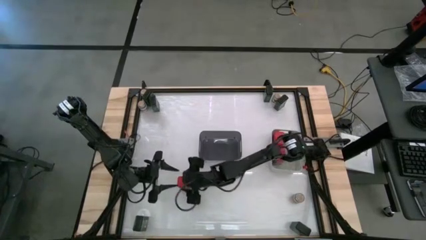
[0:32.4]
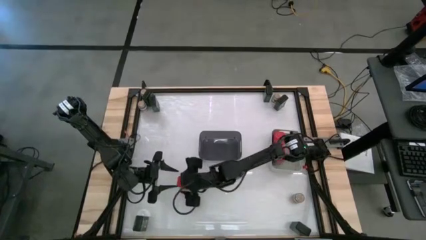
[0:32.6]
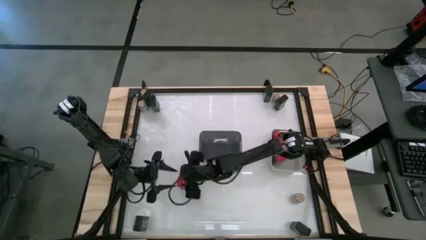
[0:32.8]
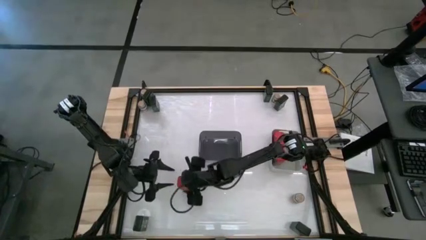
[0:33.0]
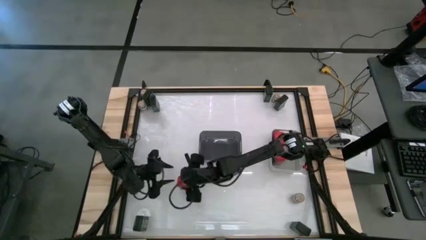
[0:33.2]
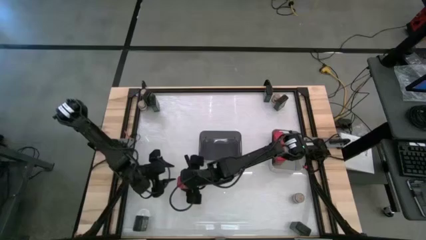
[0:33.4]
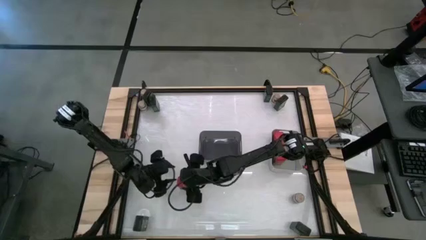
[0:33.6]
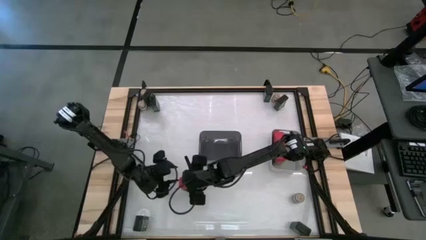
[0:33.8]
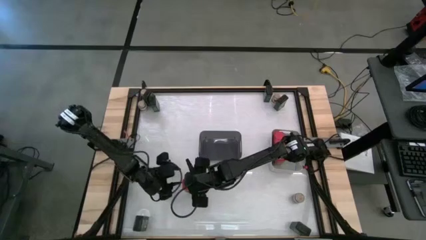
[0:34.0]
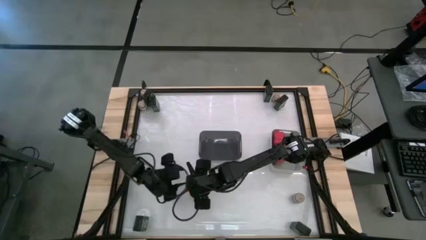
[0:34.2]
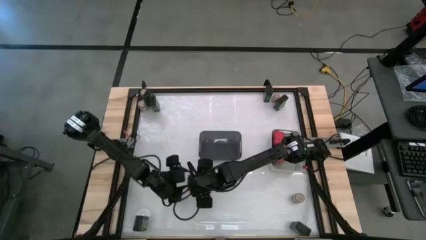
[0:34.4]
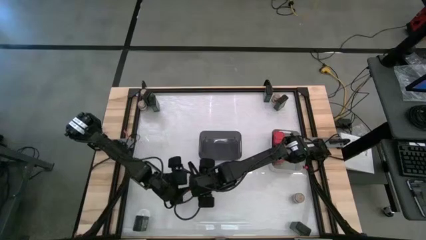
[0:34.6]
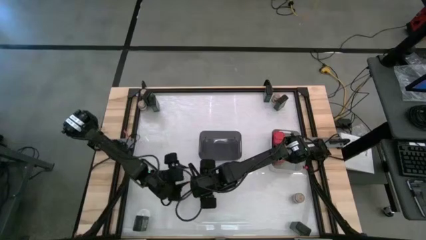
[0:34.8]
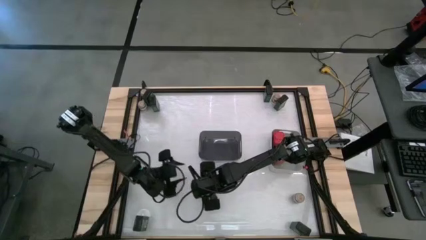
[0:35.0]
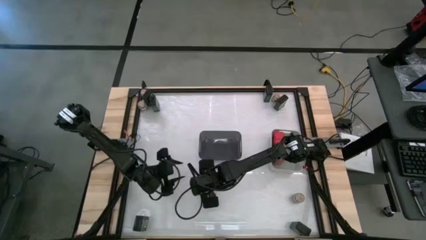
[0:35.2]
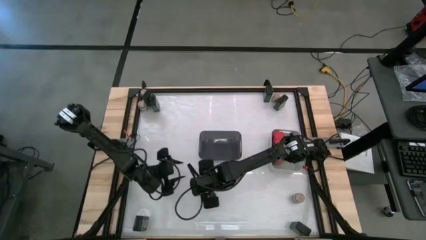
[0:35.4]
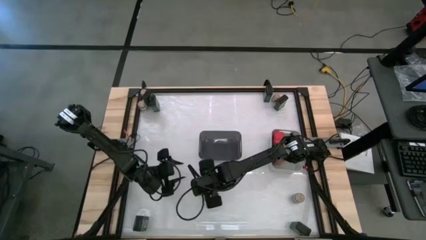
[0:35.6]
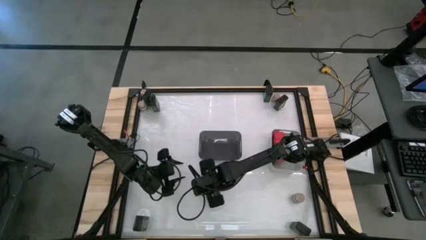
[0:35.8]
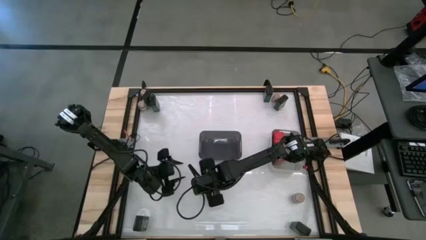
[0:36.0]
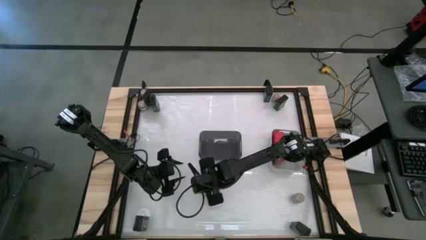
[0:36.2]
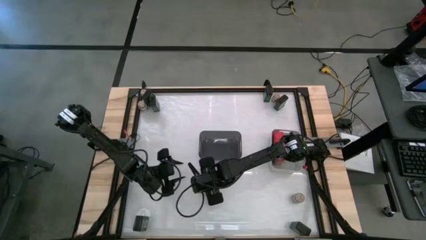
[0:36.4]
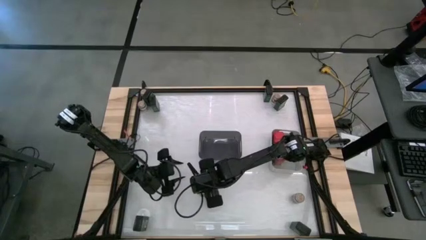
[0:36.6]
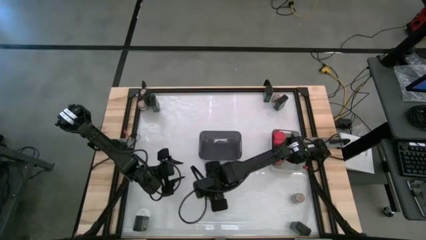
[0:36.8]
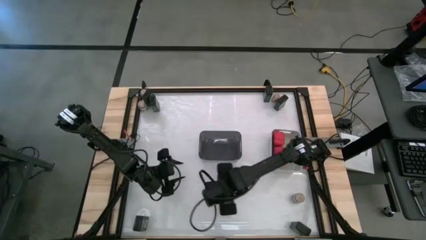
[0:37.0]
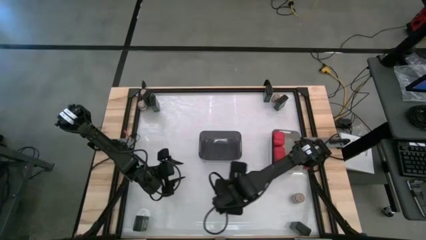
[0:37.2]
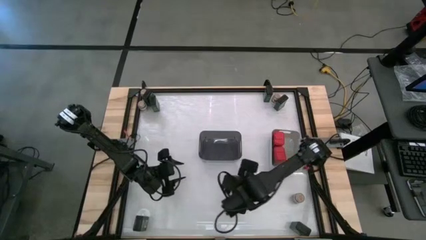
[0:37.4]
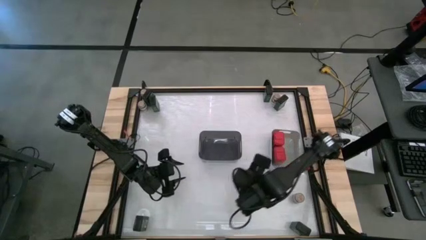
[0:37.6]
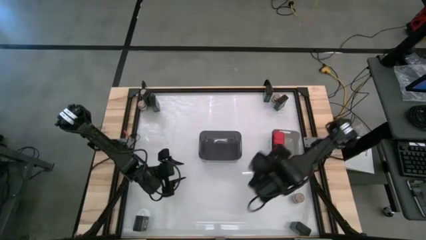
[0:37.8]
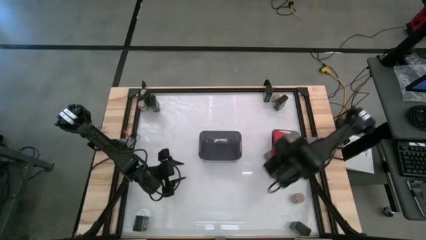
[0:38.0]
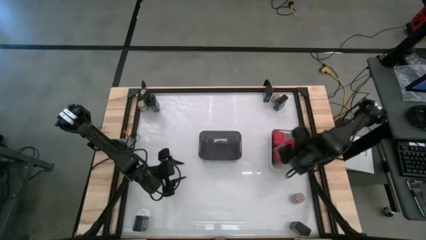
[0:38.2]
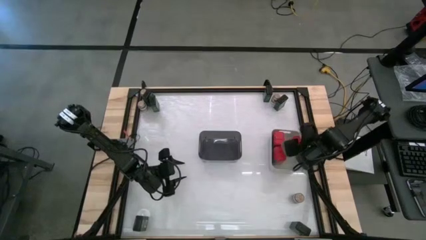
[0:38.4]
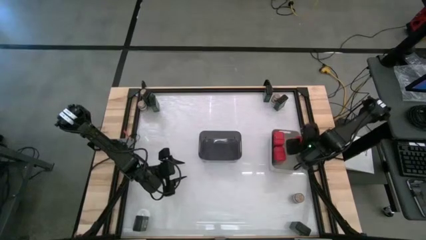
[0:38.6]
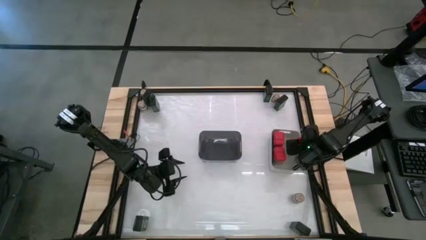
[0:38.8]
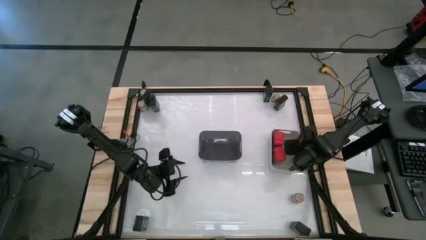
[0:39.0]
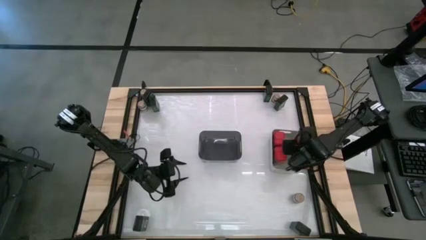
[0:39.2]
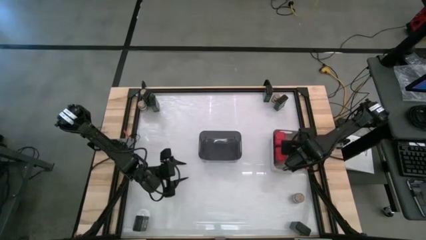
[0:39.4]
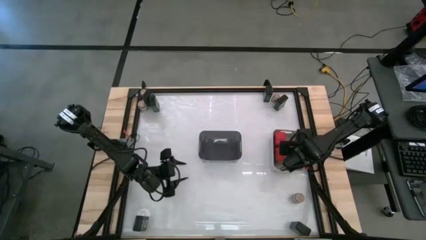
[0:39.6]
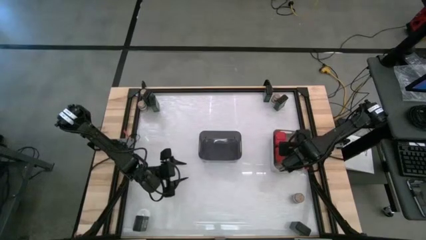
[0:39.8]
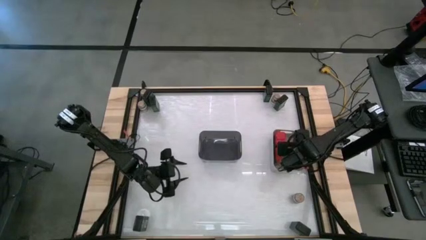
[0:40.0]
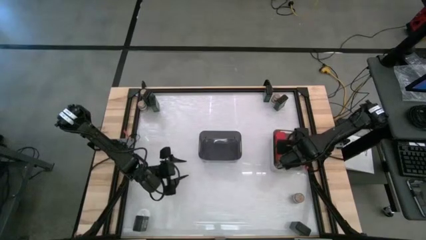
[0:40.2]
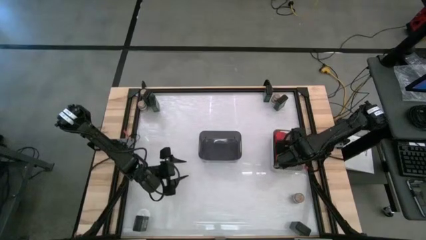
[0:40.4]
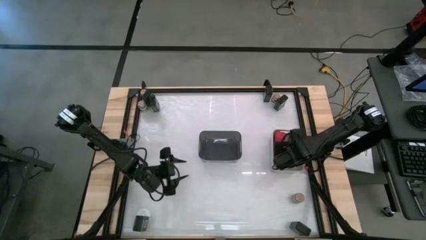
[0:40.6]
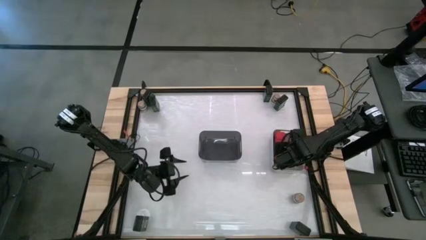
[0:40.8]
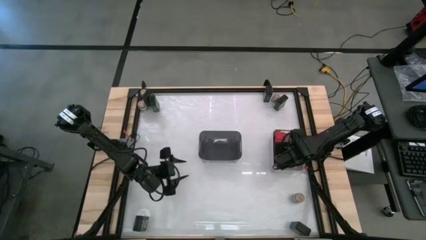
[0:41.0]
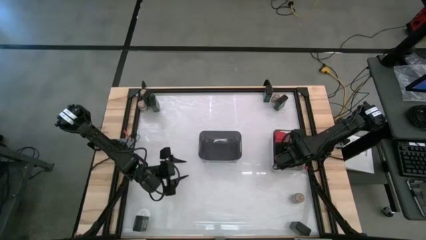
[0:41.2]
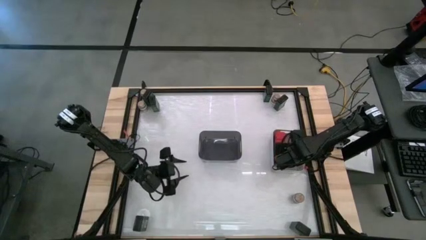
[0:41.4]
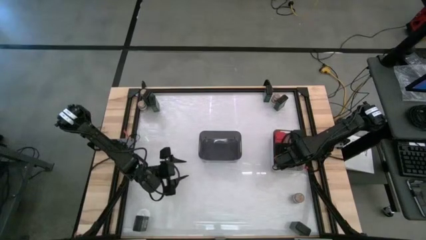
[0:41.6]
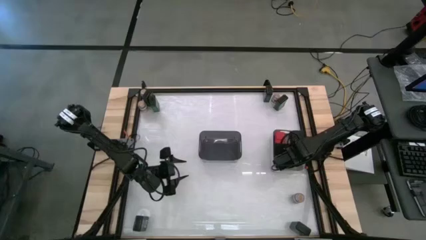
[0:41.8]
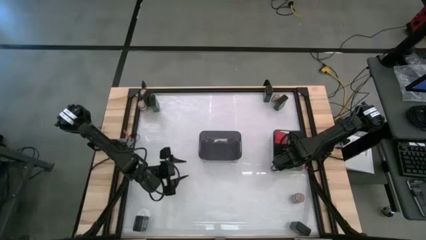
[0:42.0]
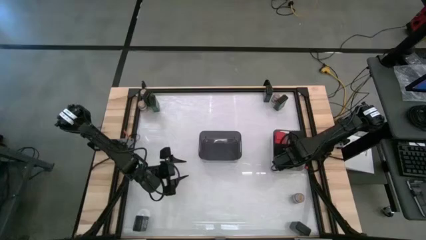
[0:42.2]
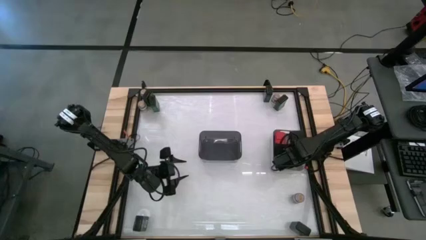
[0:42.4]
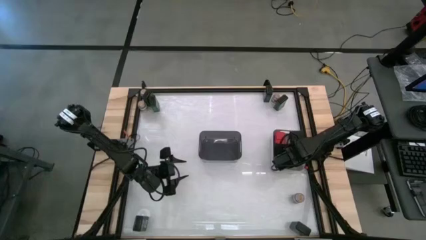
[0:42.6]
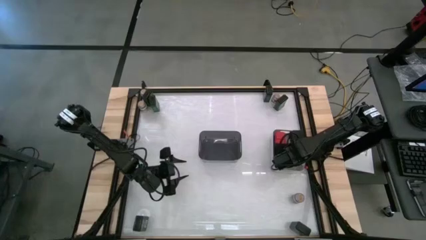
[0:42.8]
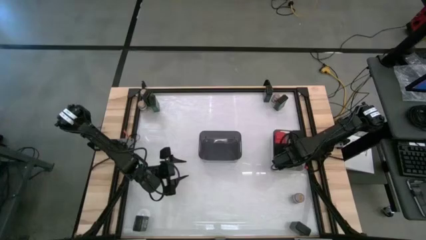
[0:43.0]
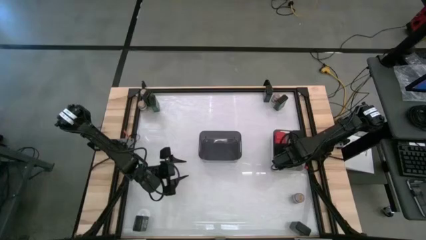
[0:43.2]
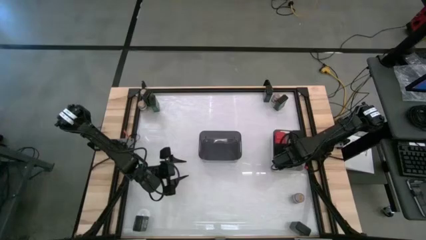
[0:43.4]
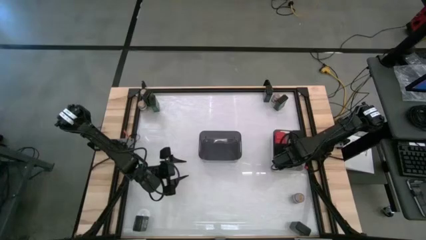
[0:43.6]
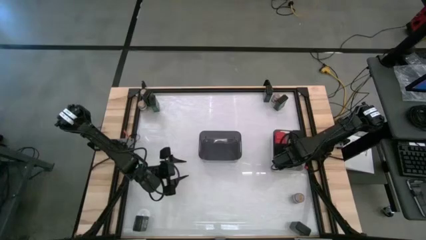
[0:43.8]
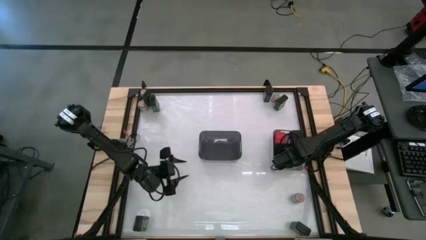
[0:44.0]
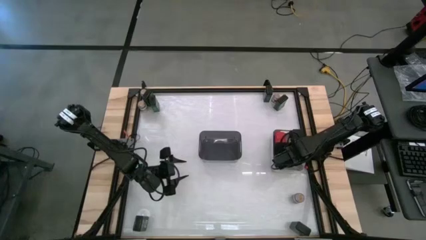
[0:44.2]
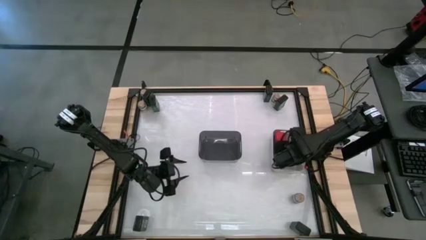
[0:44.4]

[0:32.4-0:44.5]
Task: Sort spices by type
Put the red spice can into the white bin
